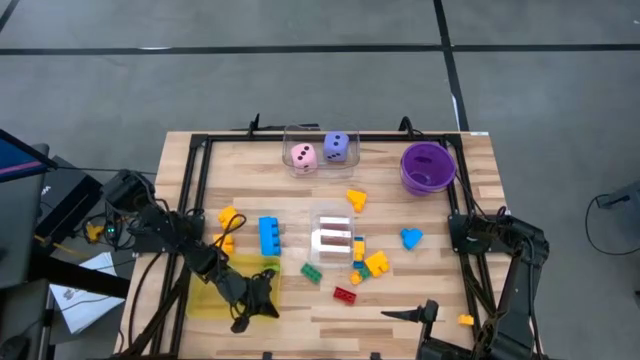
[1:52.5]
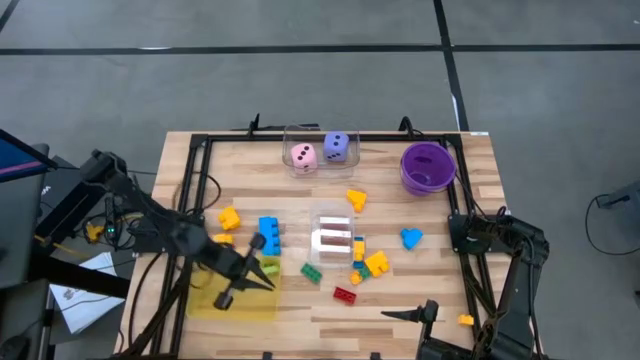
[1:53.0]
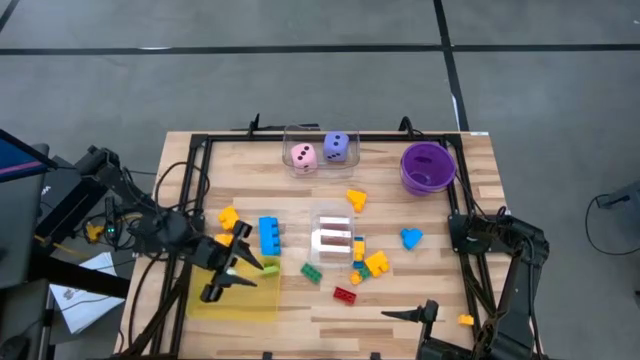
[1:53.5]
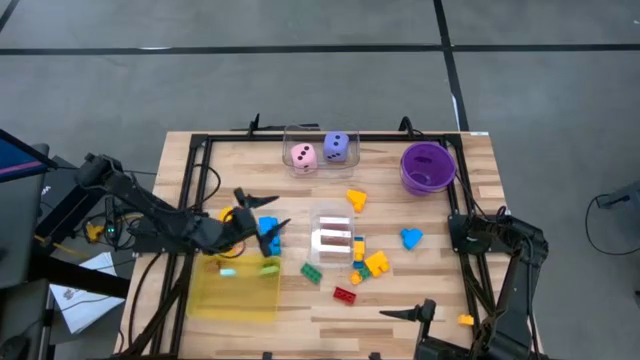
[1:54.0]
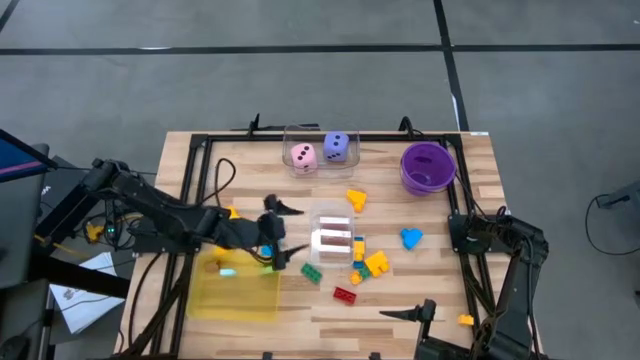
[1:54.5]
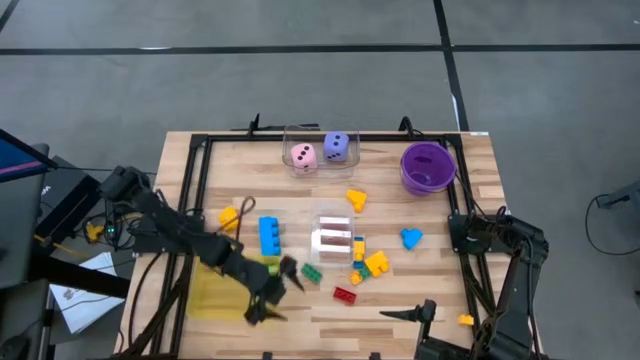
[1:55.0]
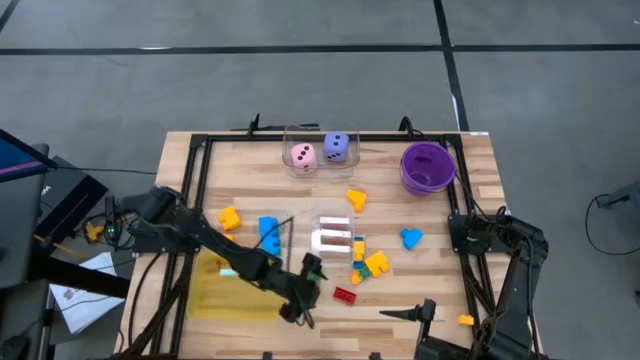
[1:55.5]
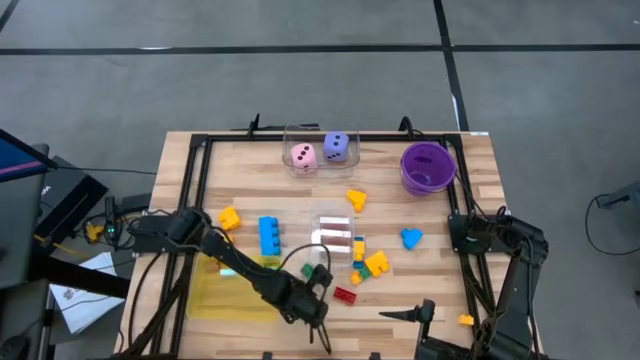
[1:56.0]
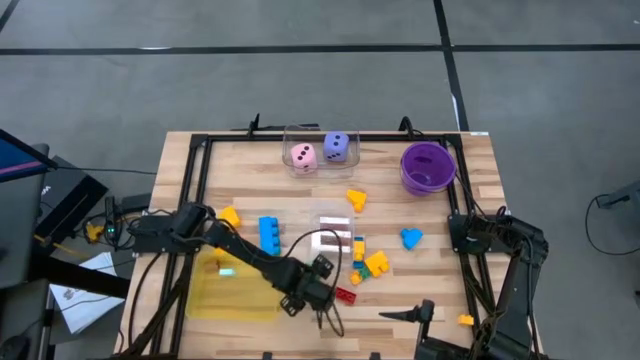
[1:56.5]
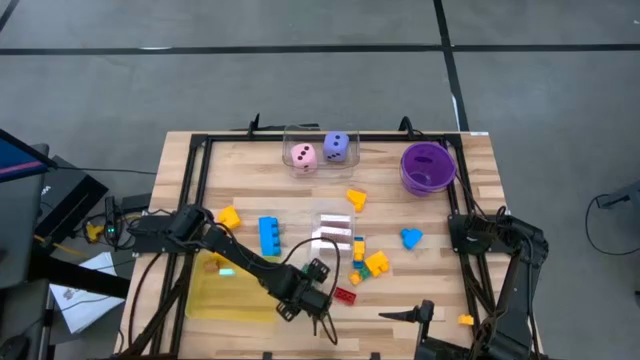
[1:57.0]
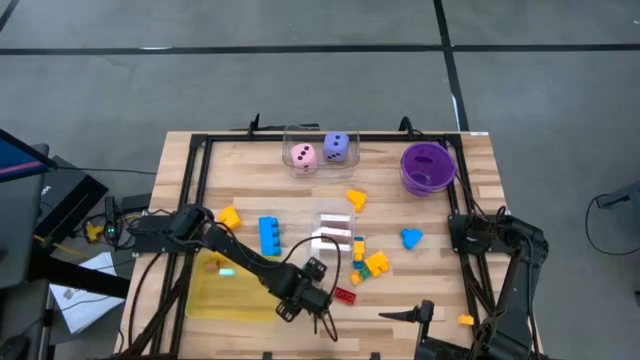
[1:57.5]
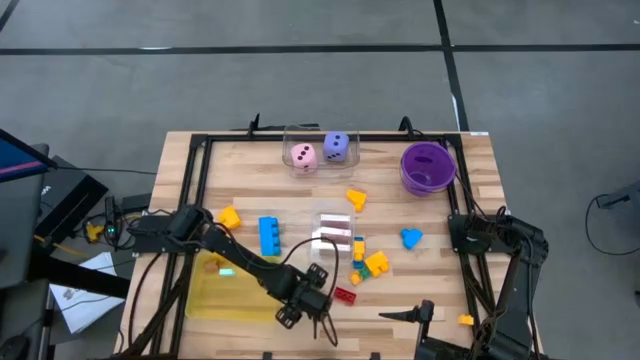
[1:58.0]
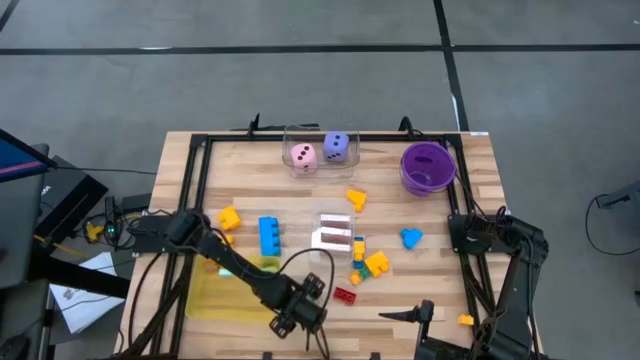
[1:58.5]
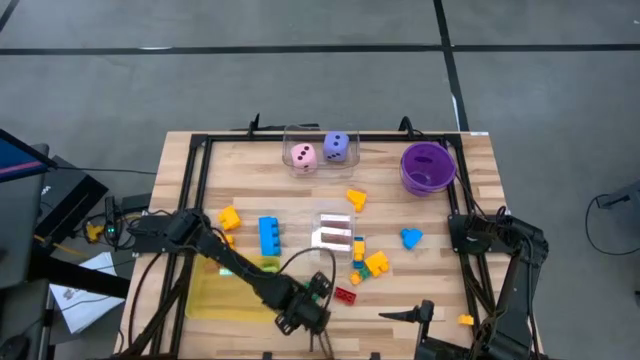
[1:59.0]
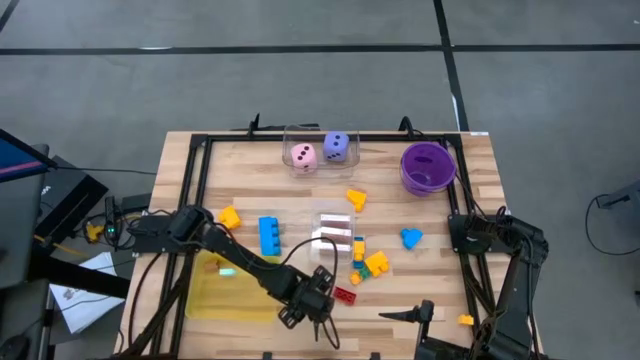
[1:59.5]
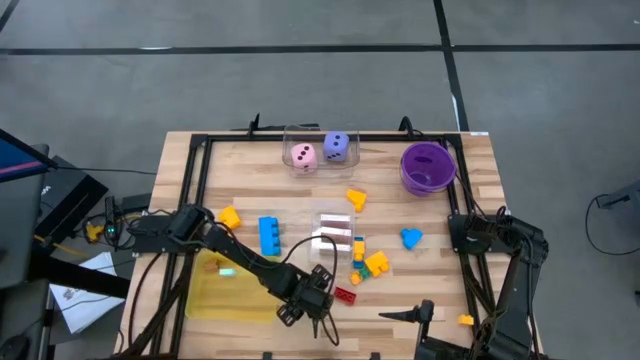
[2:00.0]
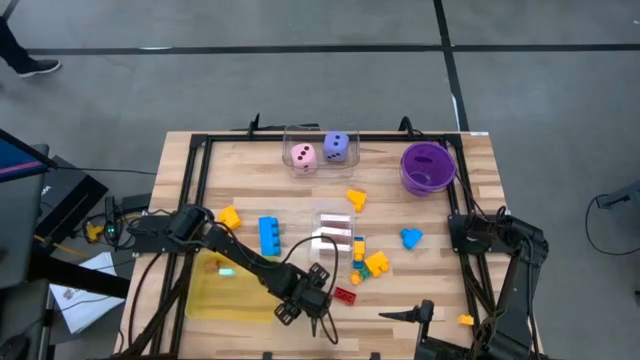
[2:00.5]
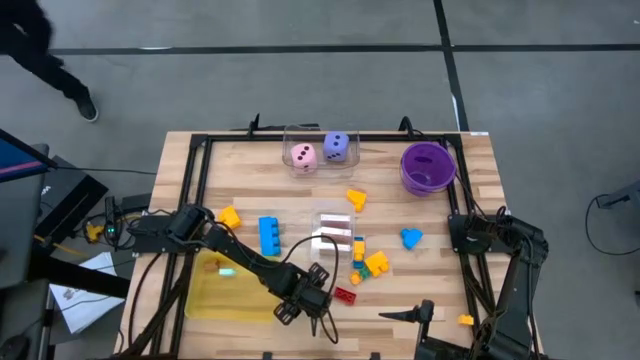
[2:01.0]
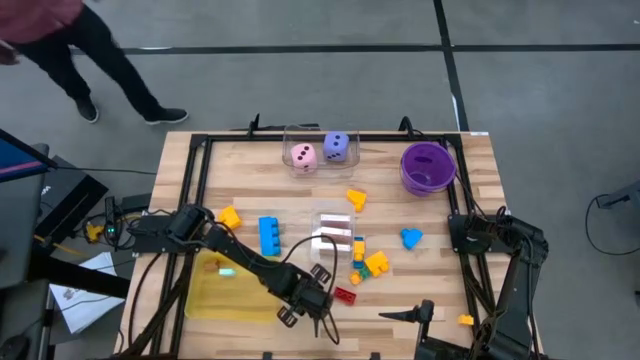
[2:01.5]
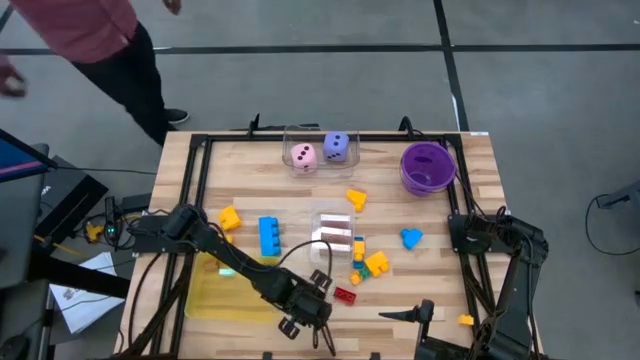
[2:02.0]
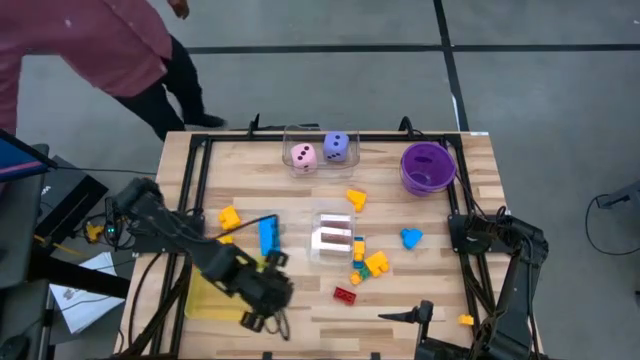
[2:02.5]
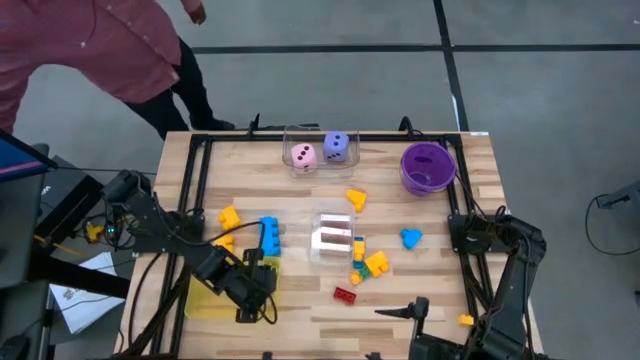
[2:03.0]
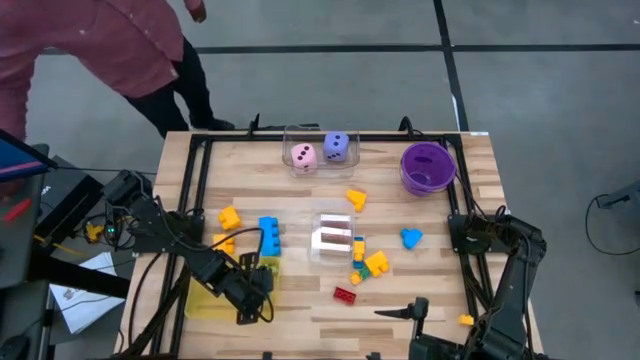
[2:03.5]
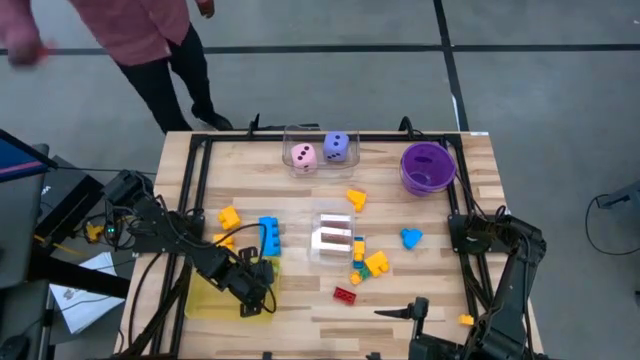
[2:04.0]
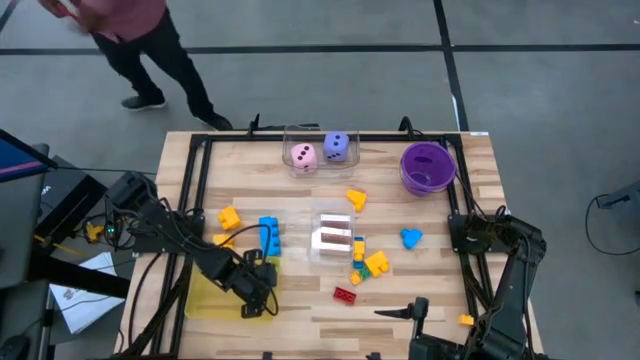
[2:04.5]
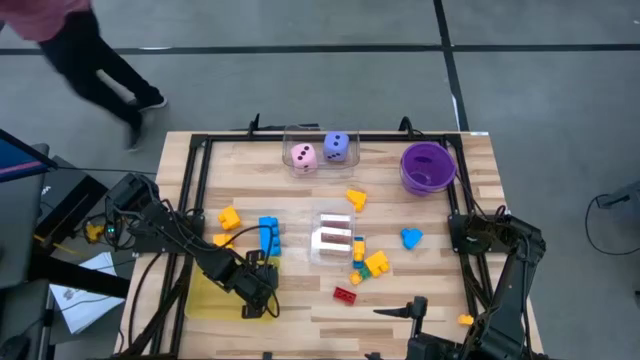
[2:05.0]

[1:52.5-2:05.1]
Task: Pick & Place Toys
Put the green game piece into the yellow bin

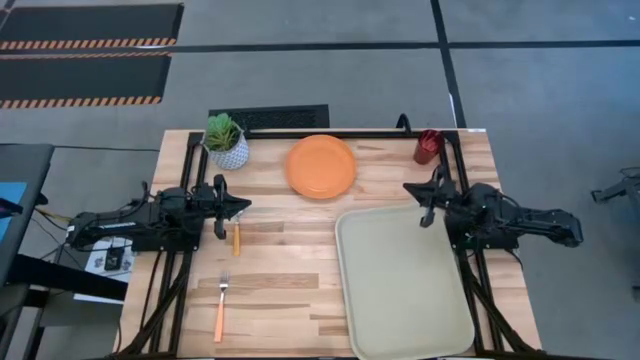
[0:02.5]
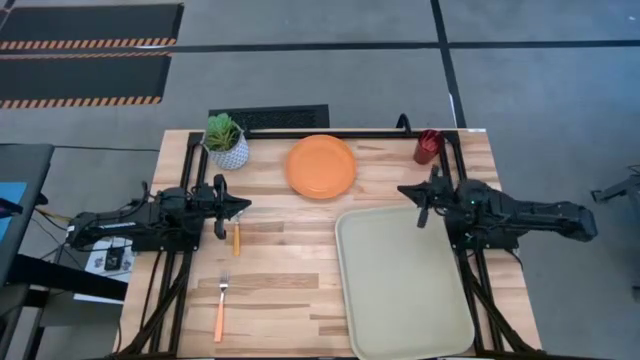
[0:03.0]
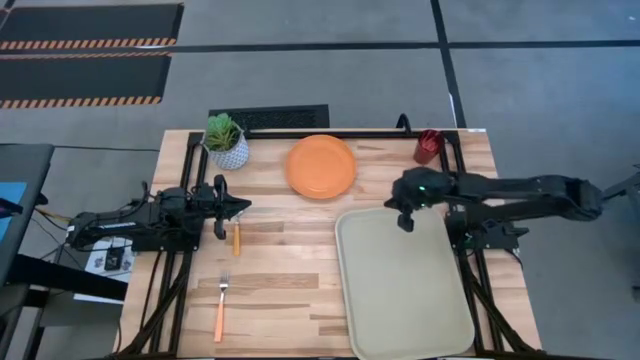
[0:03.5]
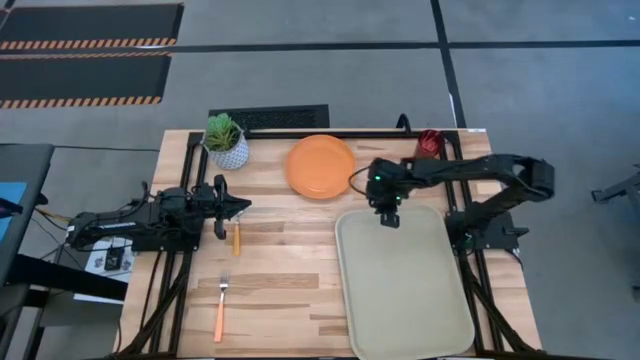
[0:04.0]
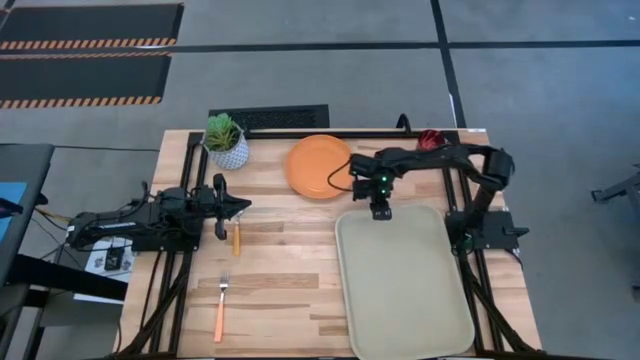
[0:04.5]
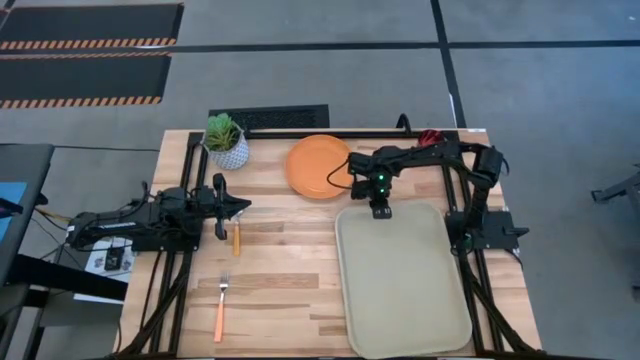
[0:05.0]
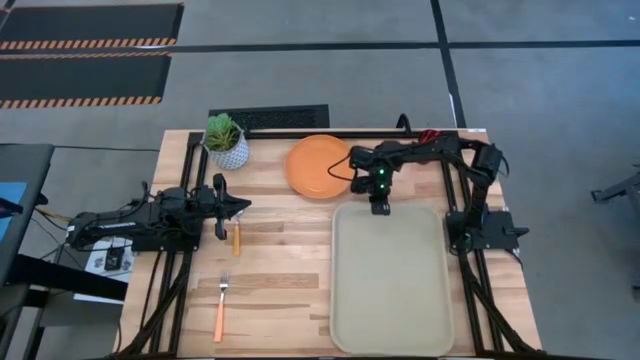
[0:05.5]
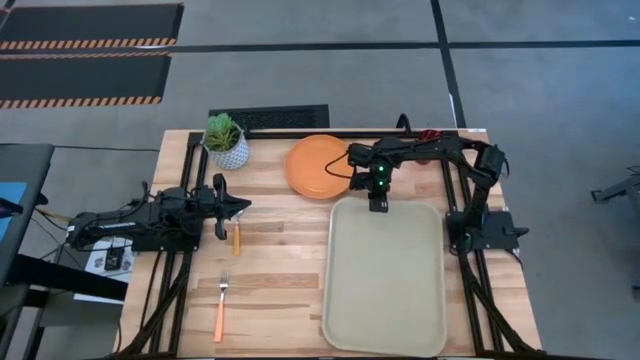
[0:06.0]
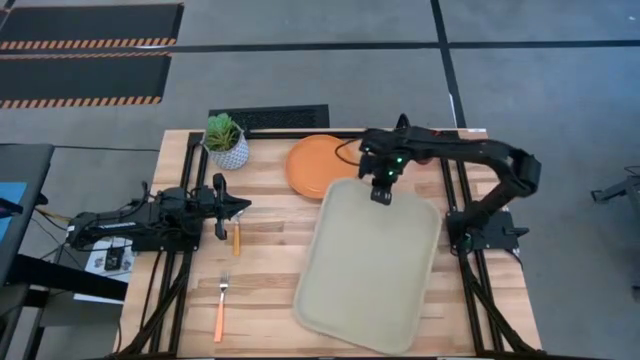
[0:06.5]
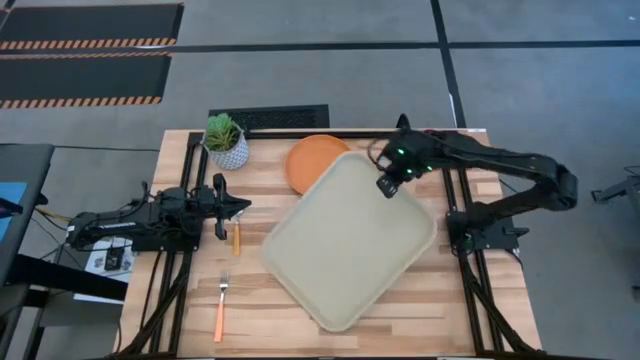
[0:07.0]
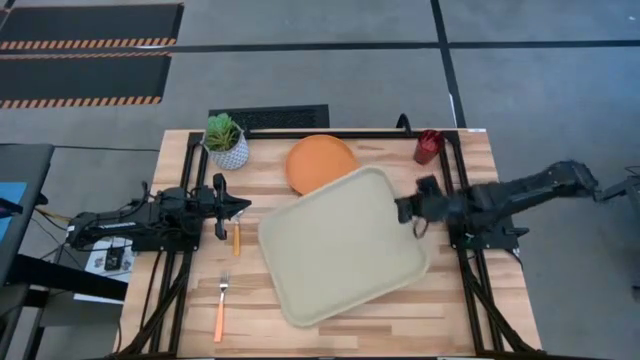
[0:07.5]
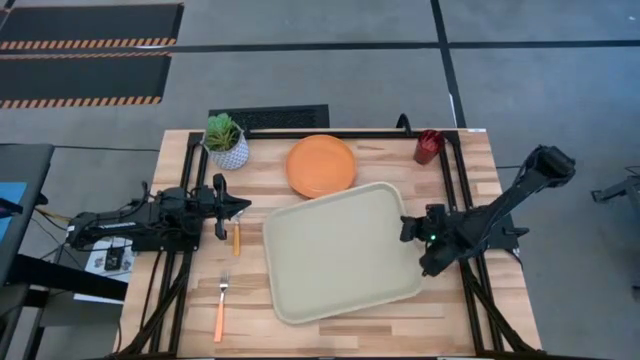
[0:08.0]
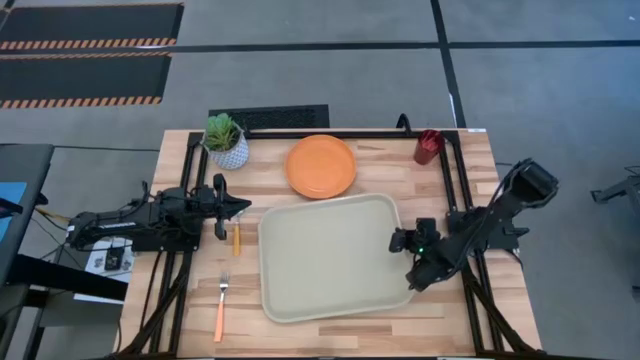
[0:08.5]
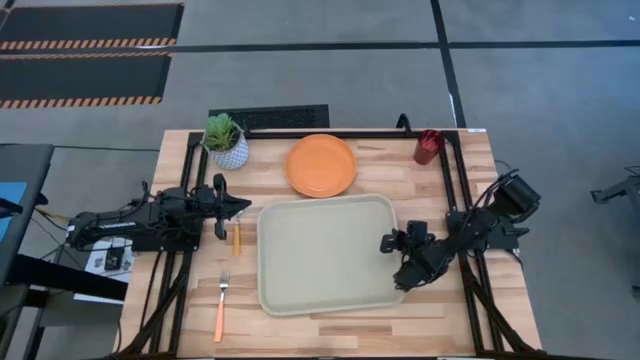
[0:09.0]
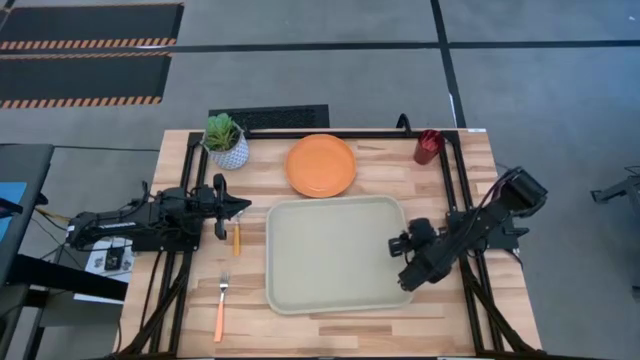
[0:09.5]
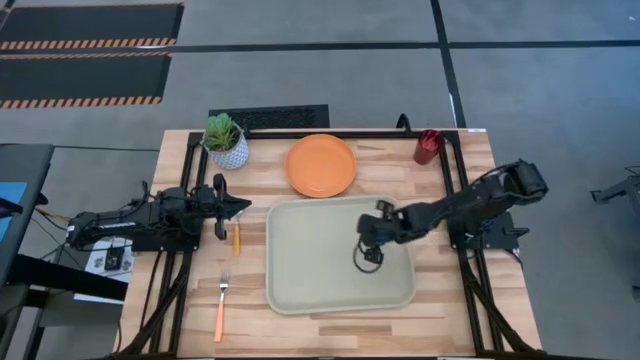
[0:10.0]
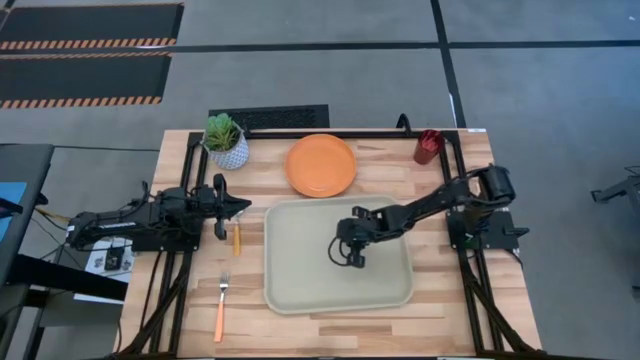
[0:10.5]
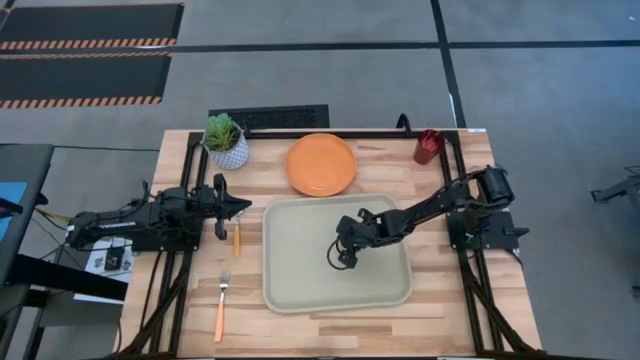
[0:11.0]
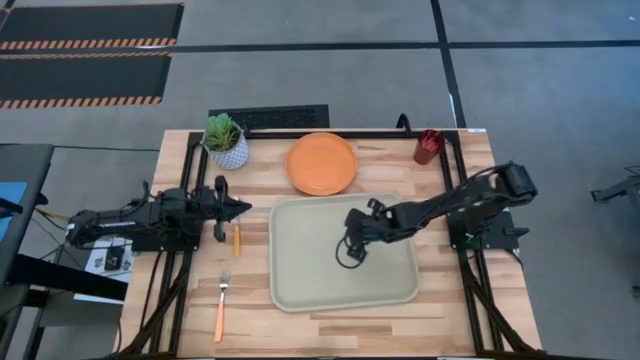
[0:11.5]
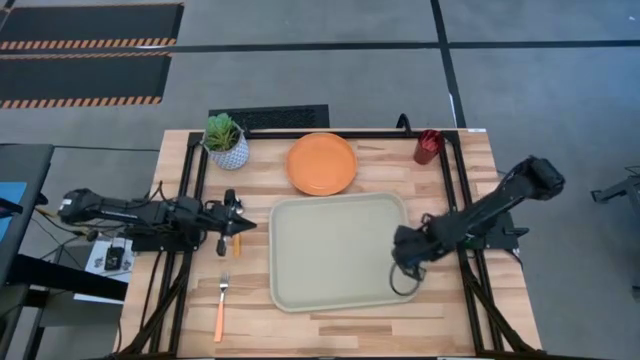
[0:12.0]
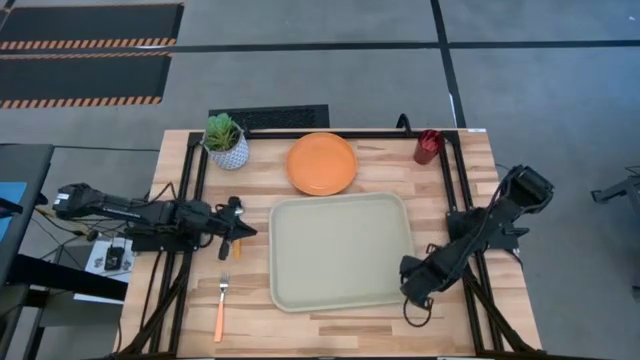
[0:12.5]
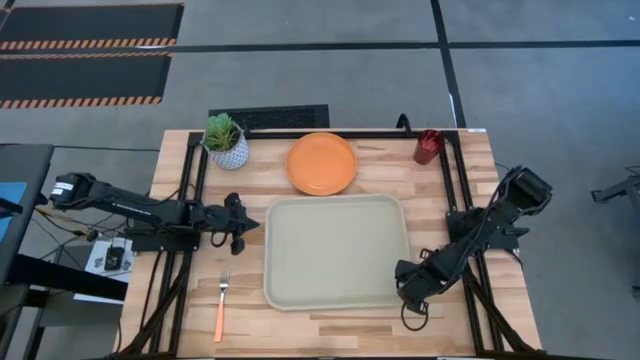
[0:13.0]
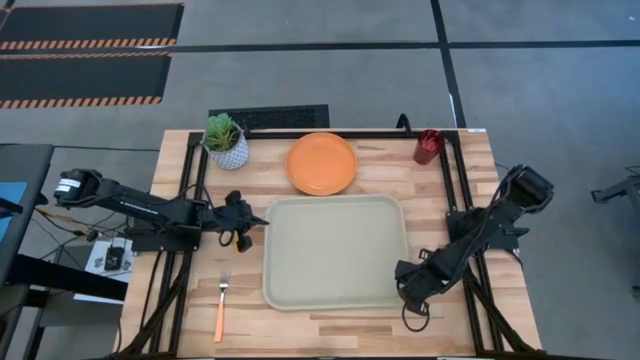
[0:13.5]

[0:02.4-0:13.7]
Task: Pick and place plate/cup/fork/spoon on tray
Prepare the gray serving tray in the center of the table
